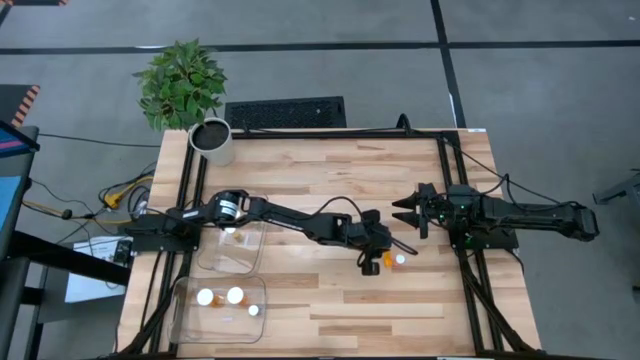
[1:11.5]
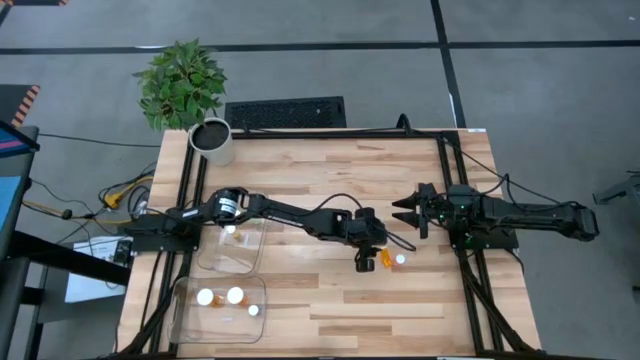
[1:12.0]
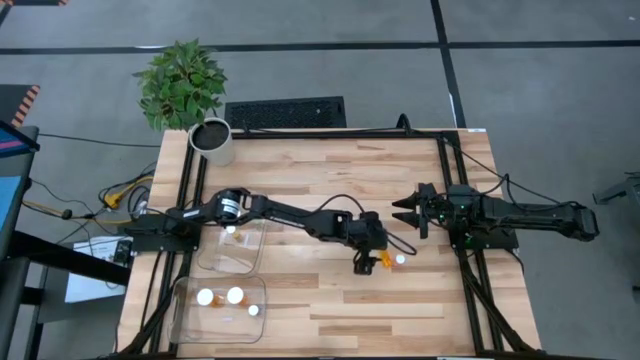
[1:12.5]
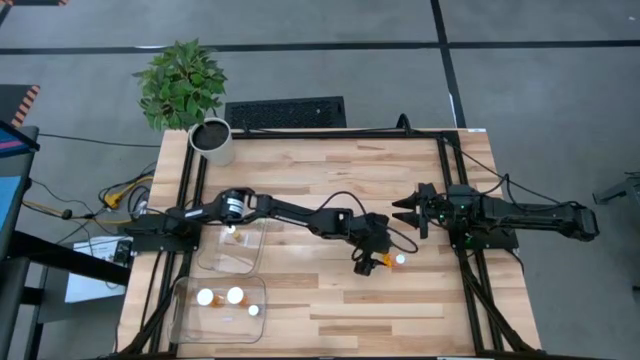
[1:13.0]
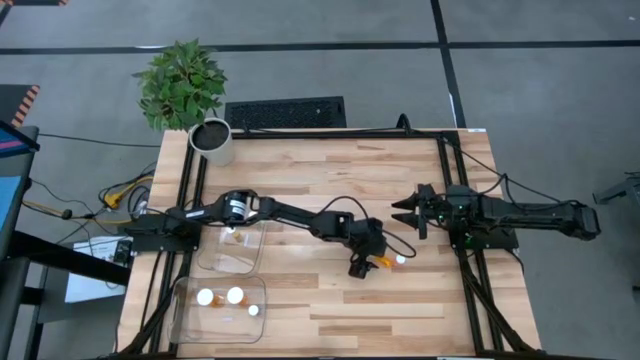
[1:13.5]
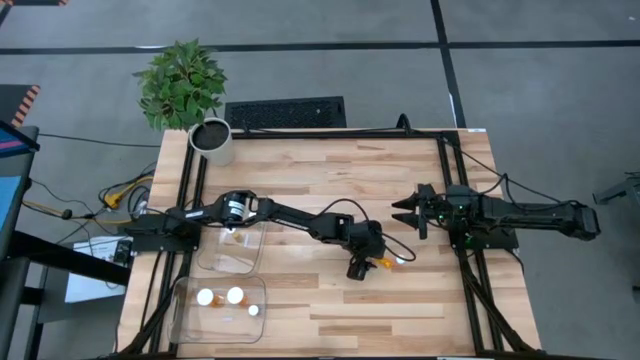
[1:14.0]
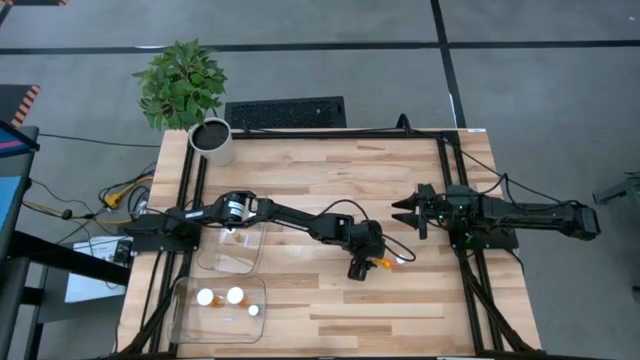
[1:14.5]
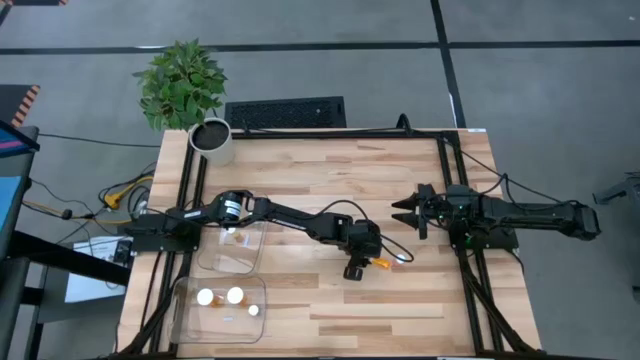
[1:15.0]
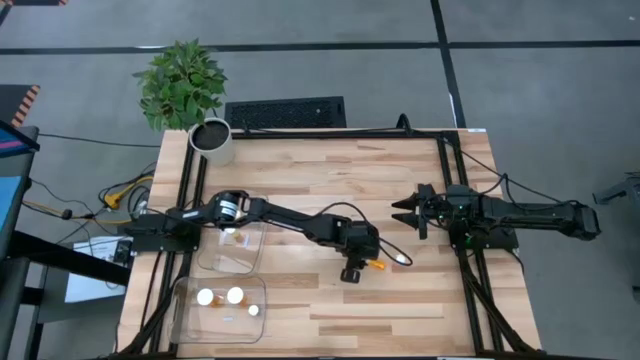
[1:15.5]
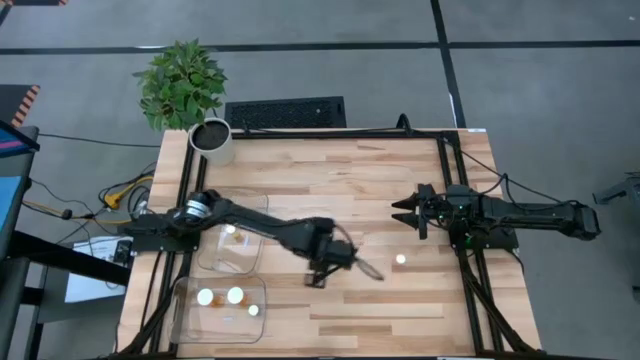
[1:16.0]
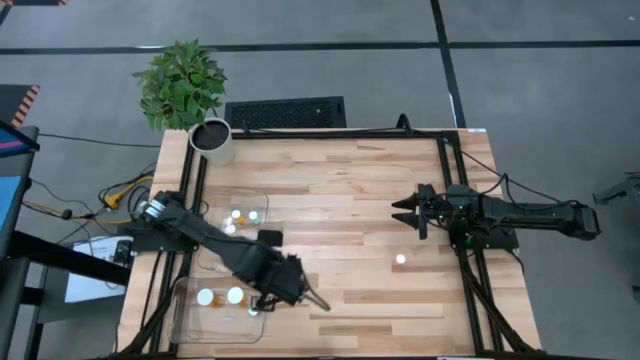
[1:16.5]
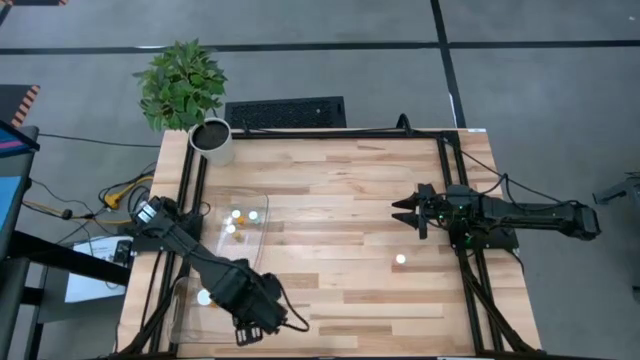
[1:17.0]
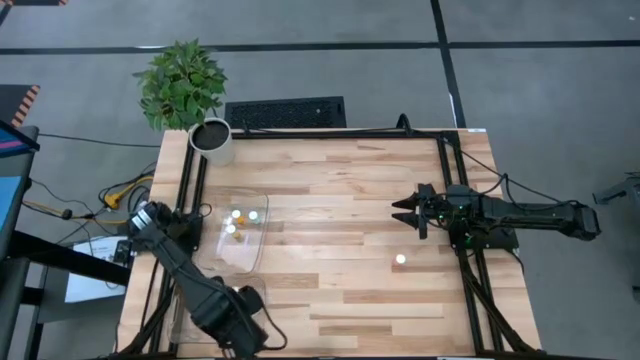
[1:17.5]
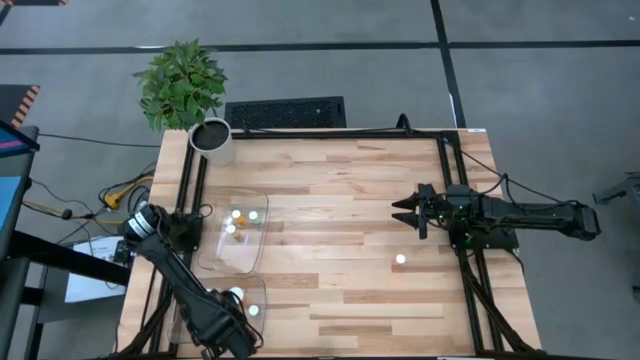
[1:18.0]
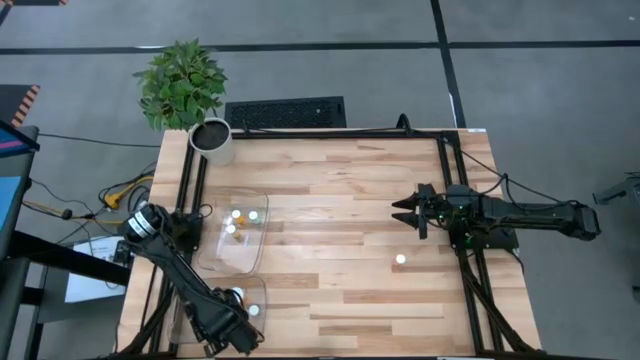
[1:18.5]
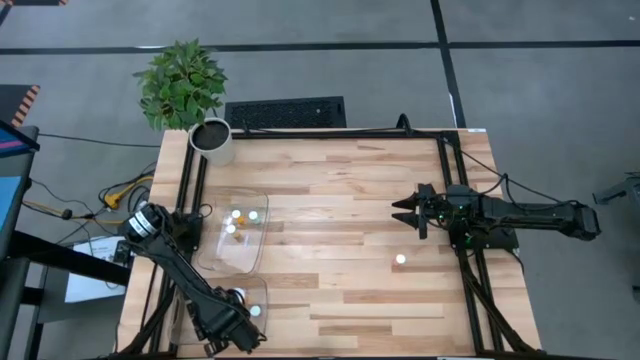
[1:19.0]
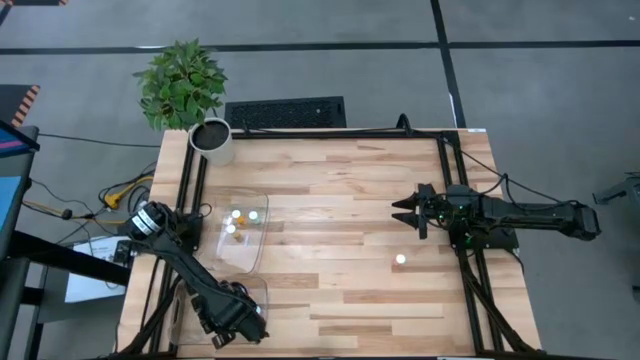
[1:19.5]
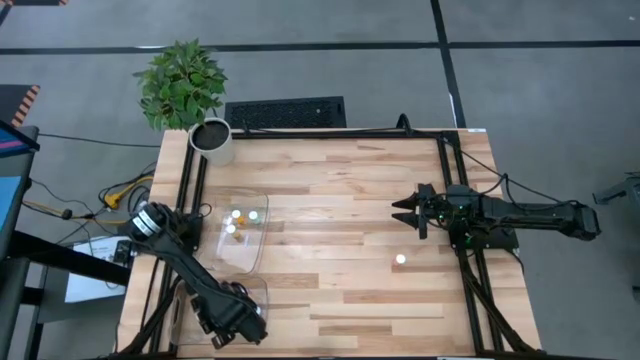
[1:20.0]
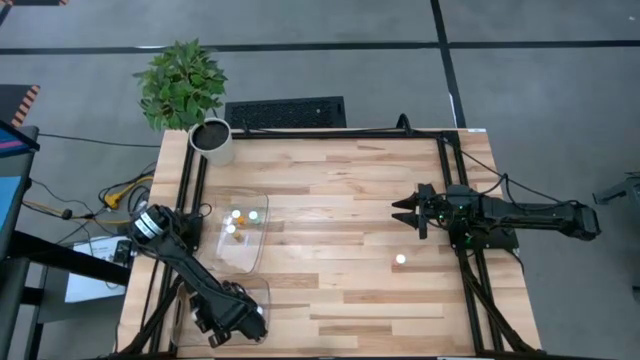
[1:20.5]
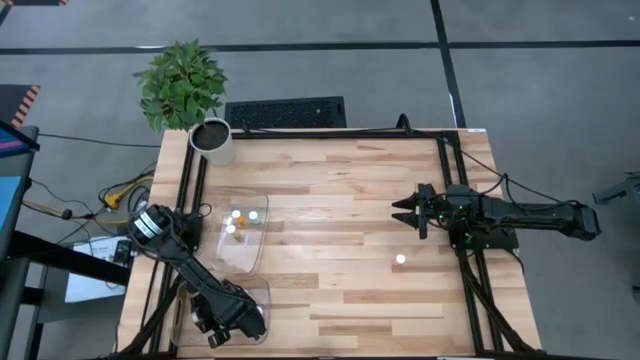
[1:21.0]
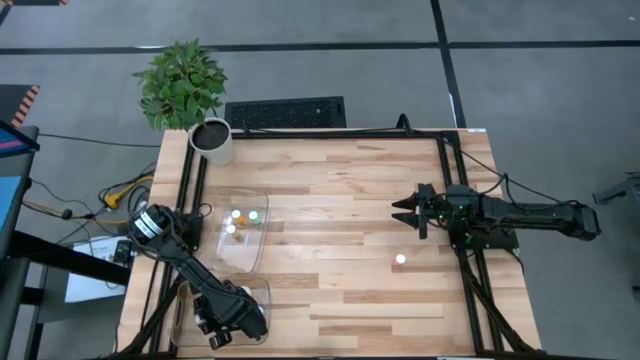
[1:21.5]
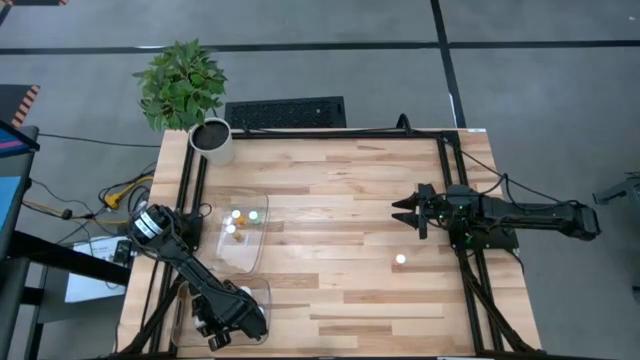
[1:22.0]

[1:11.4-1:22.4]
Task: Pick and place medicine bottles into bin by pill shape (circle, oval)
Put the orange capsule bottle into the bottom transparent bin

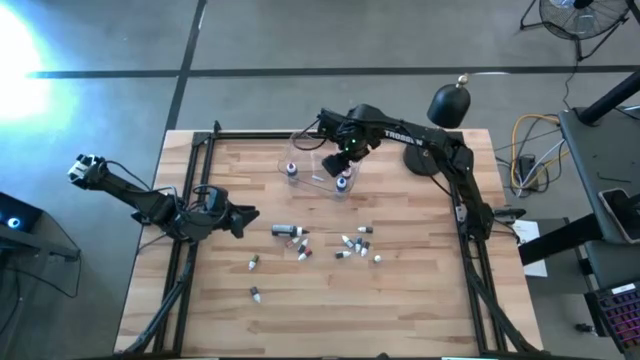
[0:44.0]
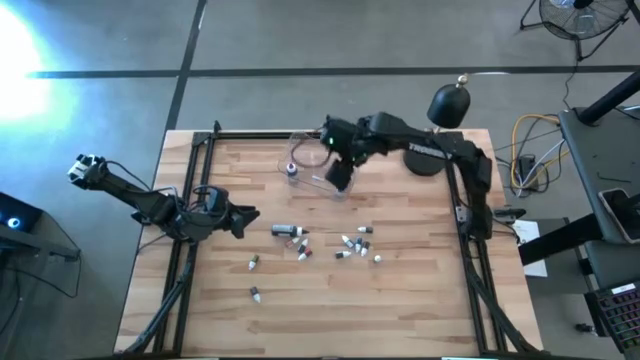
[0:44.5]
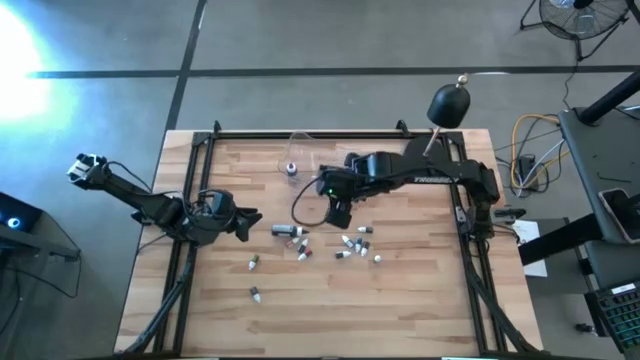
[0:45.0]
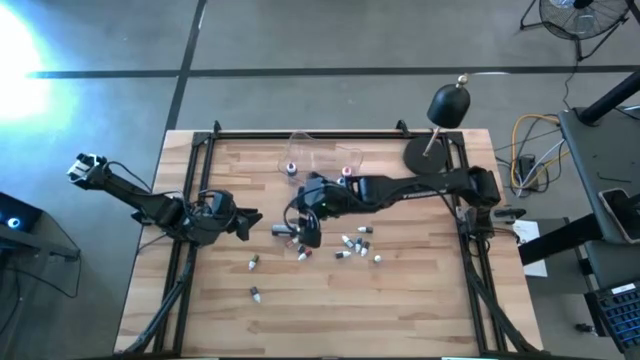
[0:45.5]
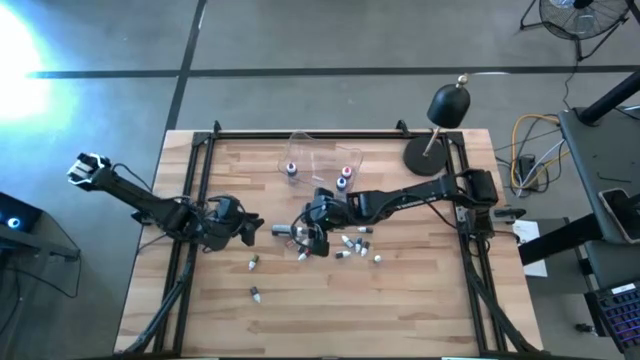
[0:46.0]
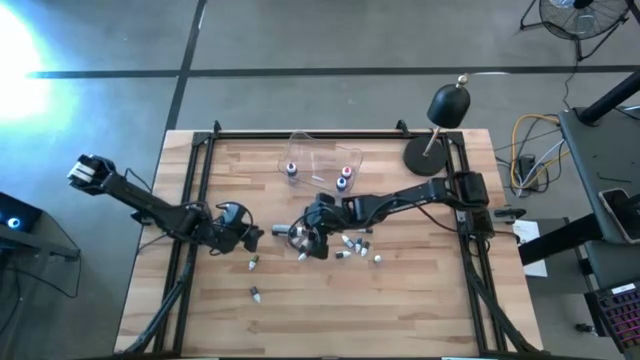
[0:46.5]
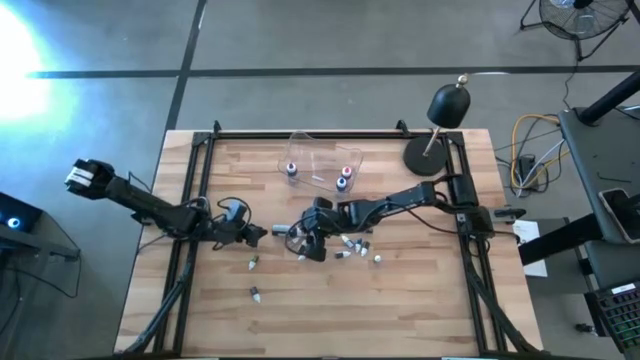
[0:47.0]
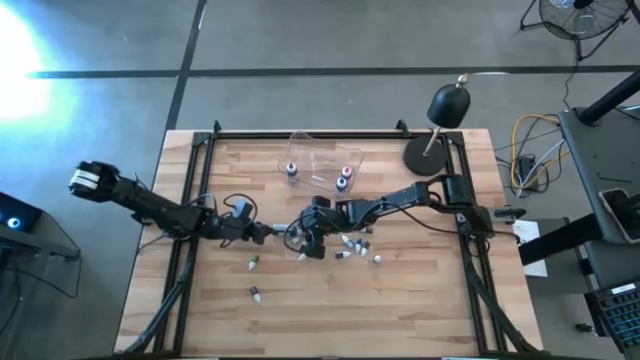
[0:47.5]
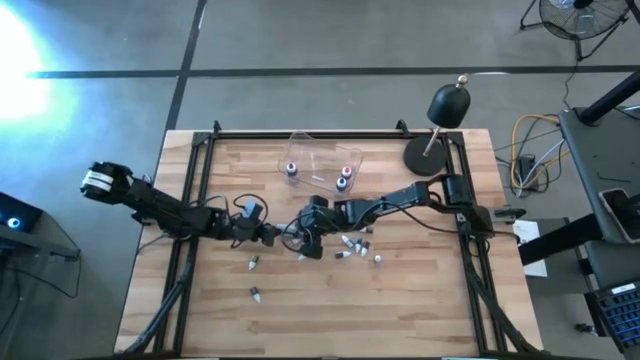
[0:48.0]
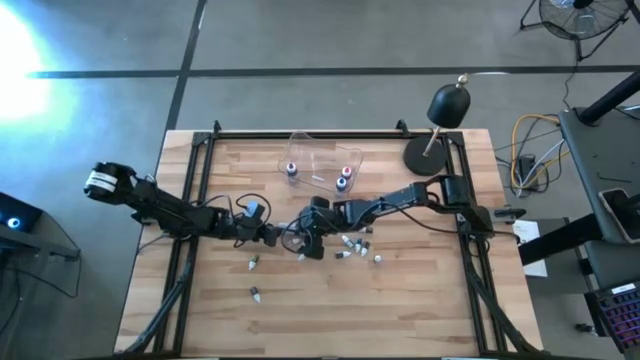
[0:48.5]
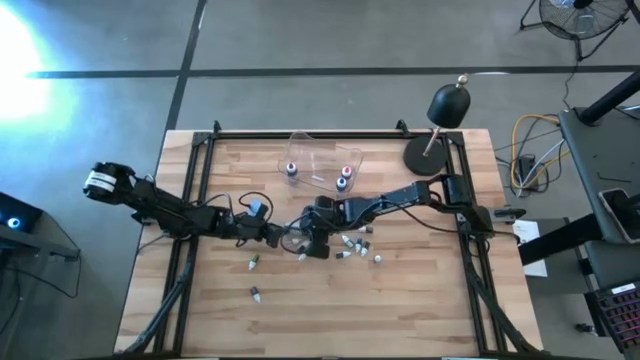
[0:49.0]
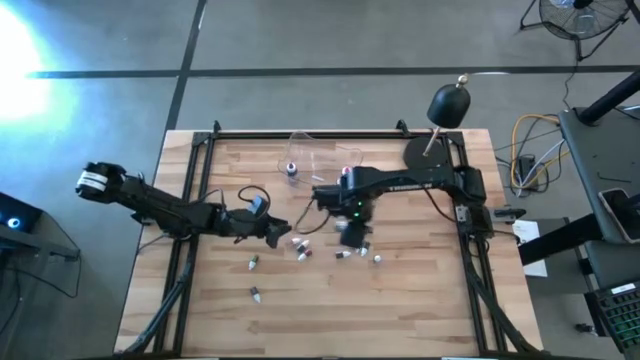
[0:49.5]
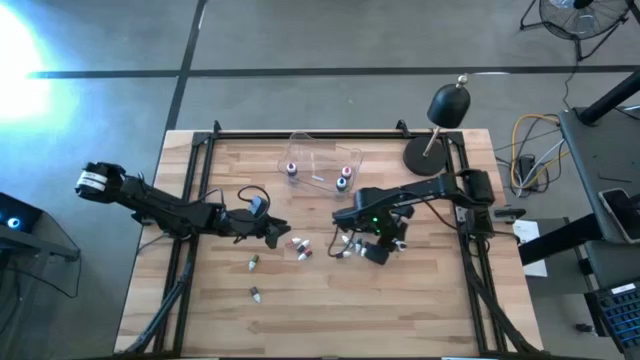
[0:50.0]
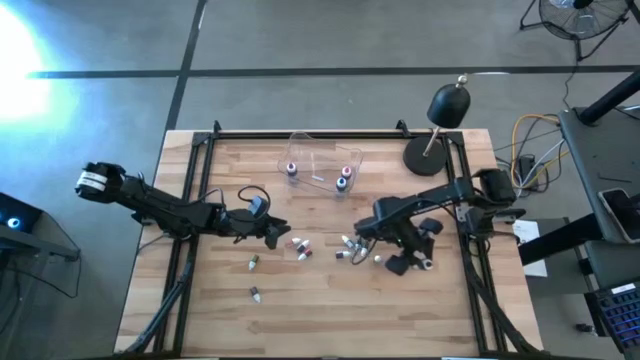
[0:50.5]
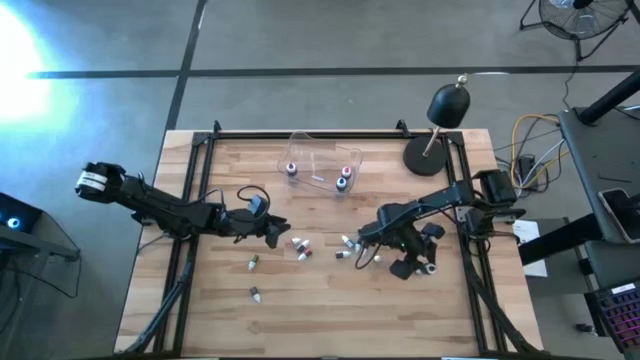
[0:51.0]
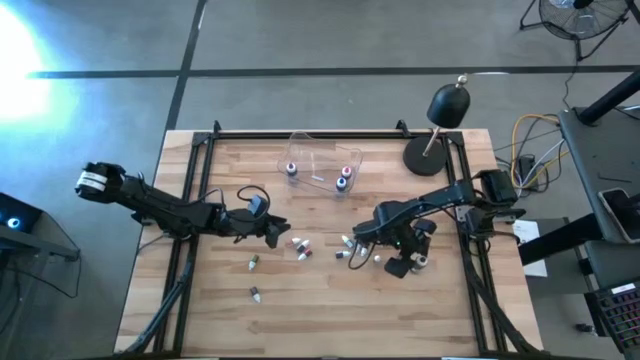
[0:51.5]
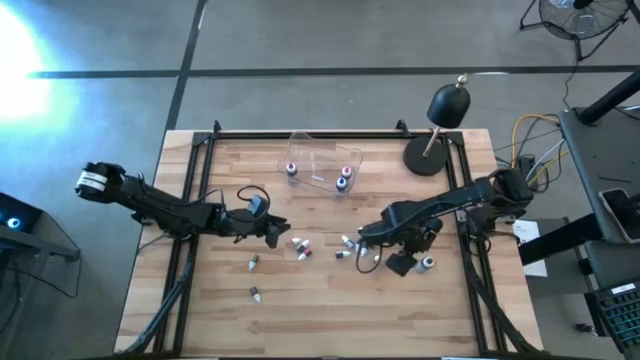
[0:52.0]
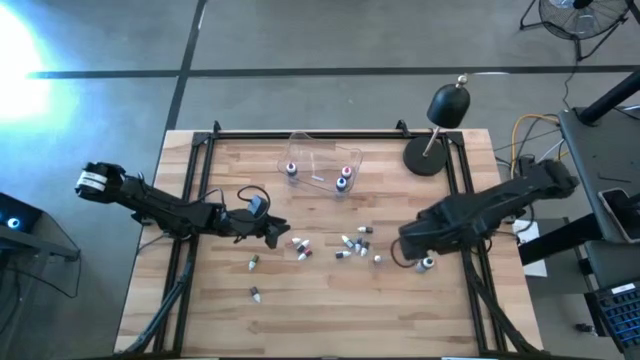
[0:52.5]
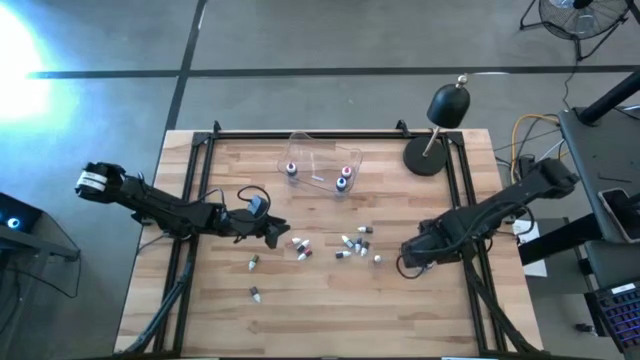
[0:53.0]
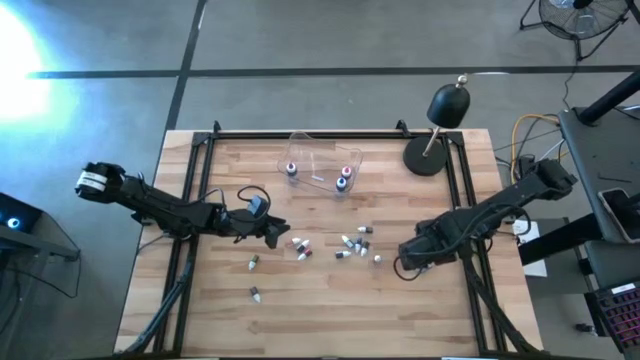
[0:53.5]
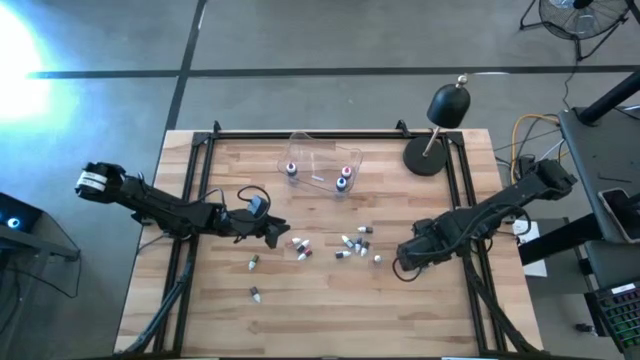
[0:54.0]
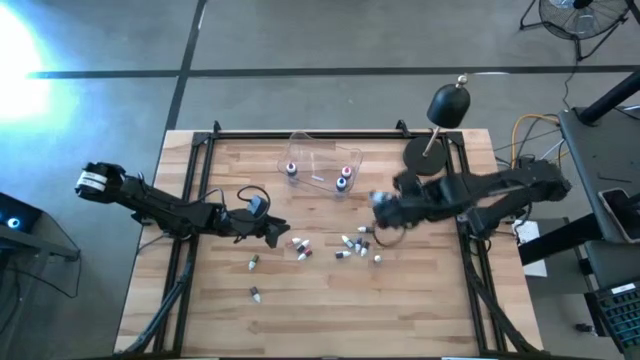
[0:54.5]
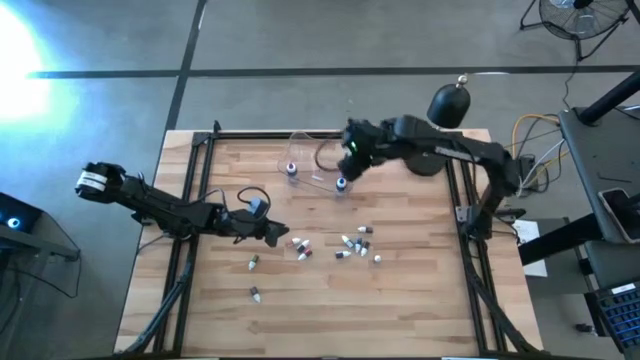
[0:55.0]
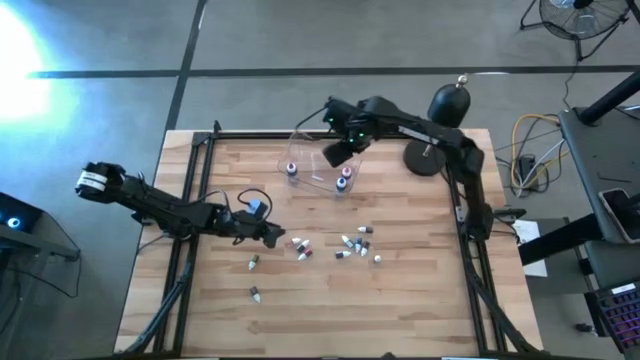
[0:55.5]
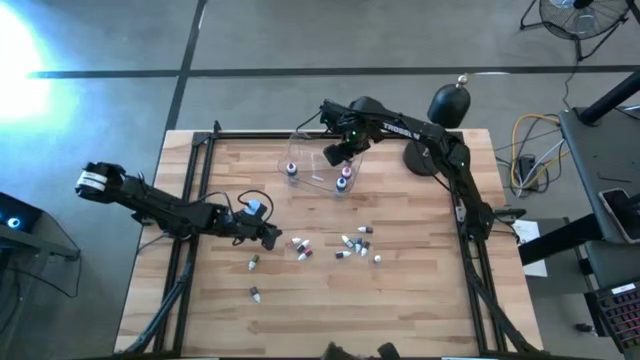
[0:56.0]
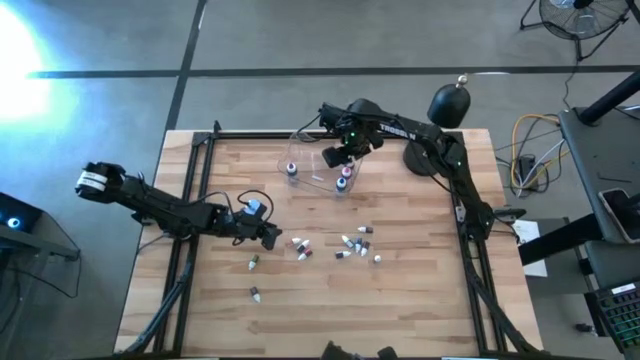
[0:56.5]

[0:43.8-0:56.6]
Task: Pick & Place food coloring
Put the large black food coloring bottle into the transparent bin
